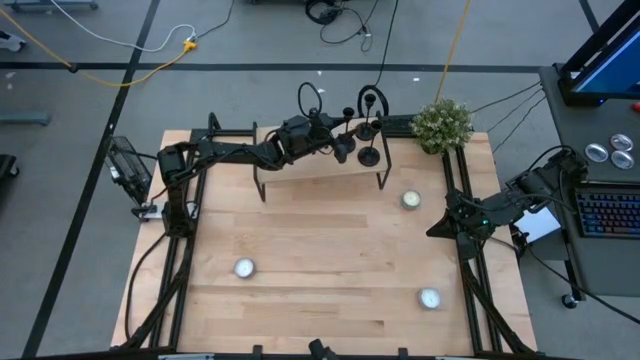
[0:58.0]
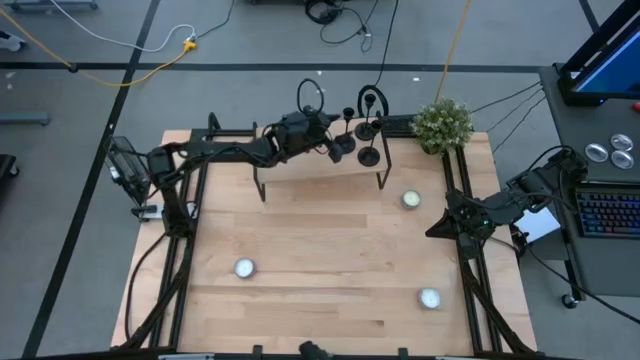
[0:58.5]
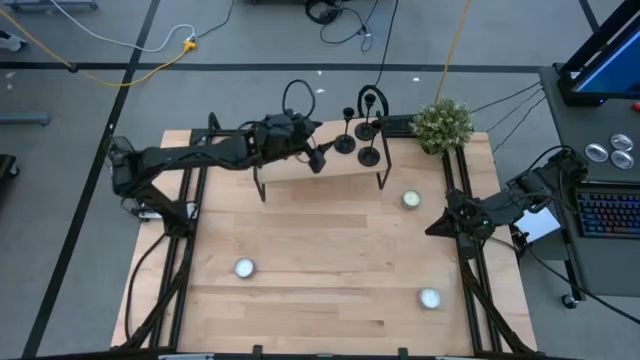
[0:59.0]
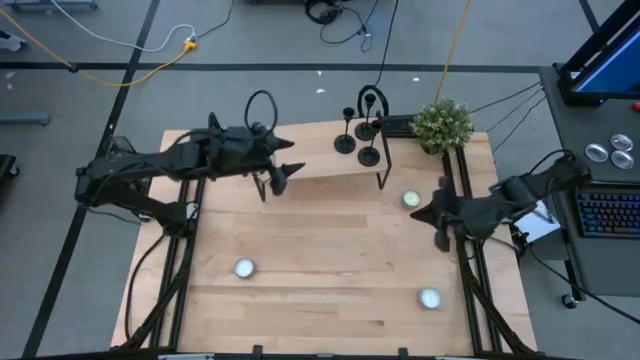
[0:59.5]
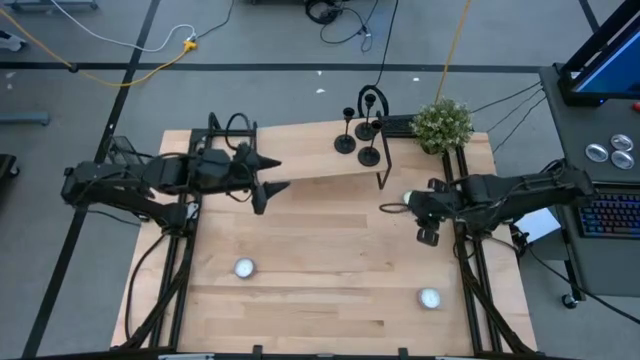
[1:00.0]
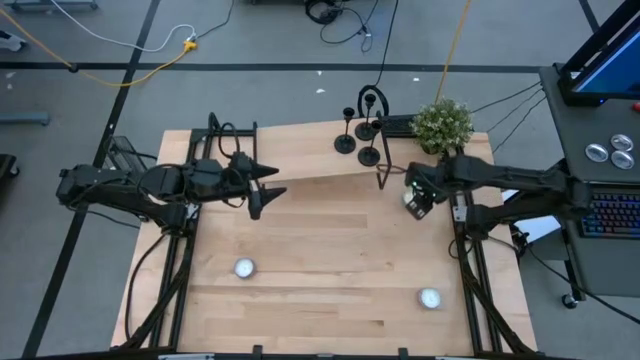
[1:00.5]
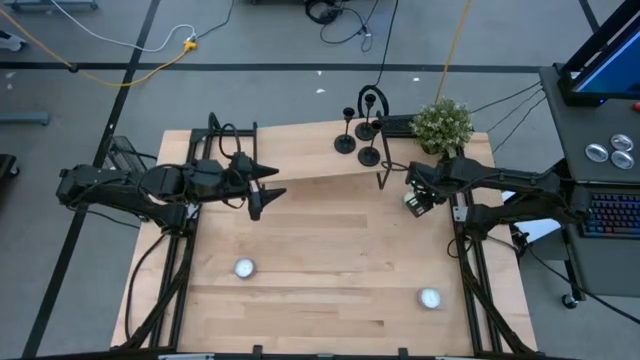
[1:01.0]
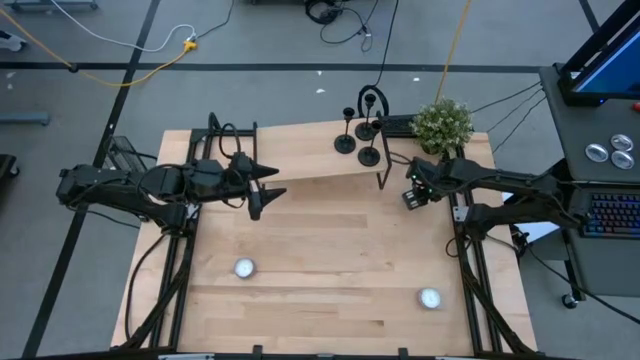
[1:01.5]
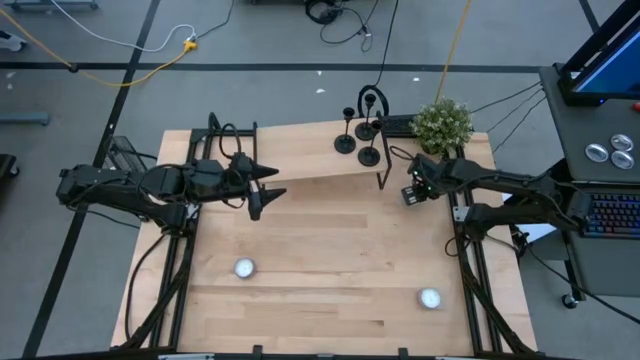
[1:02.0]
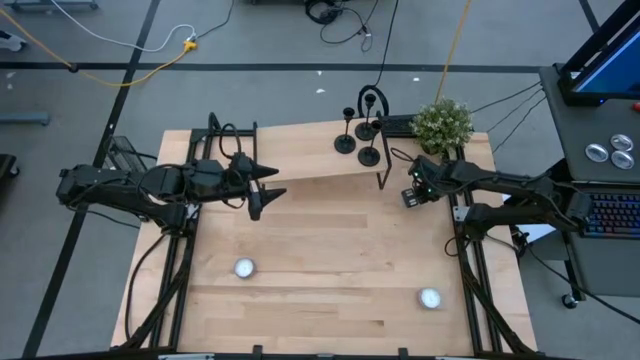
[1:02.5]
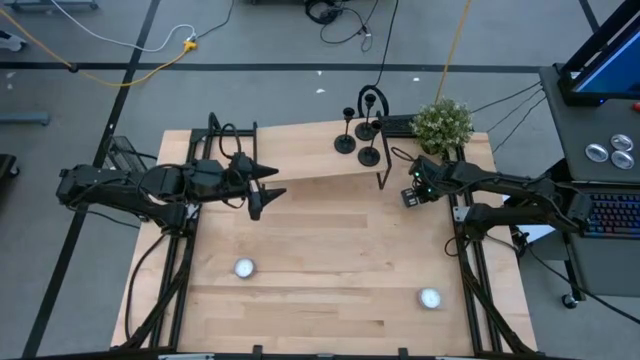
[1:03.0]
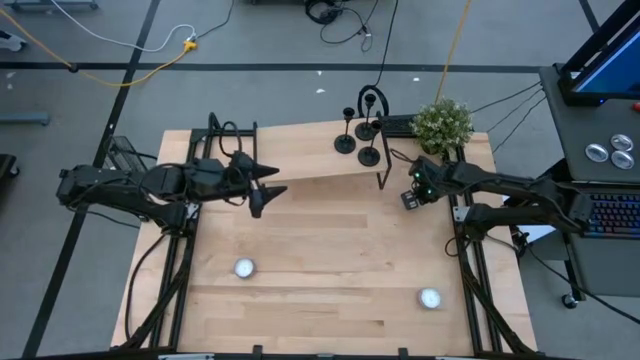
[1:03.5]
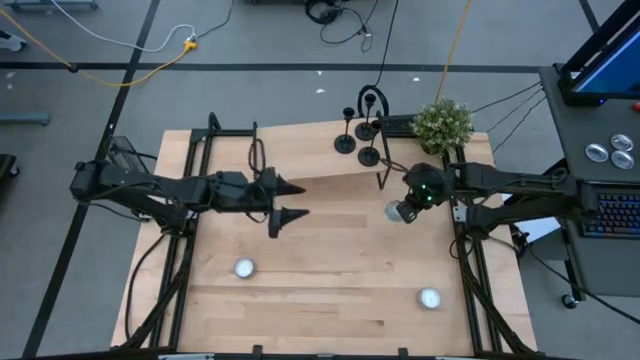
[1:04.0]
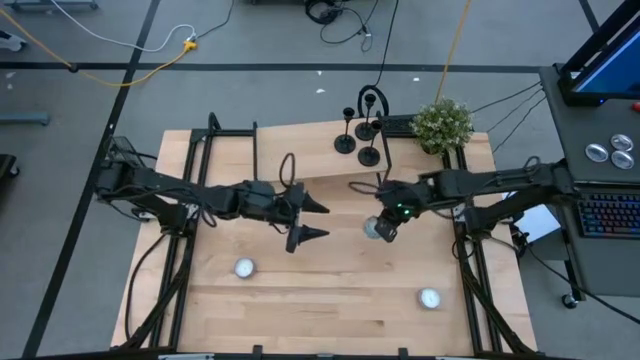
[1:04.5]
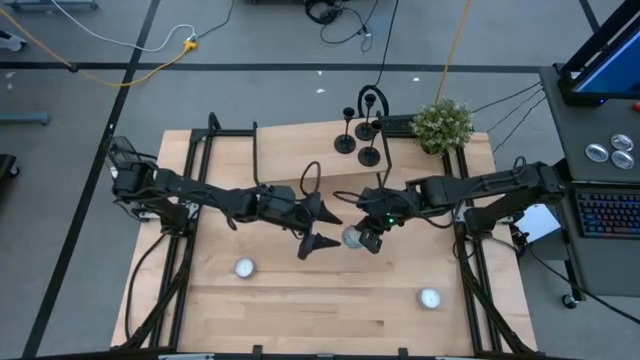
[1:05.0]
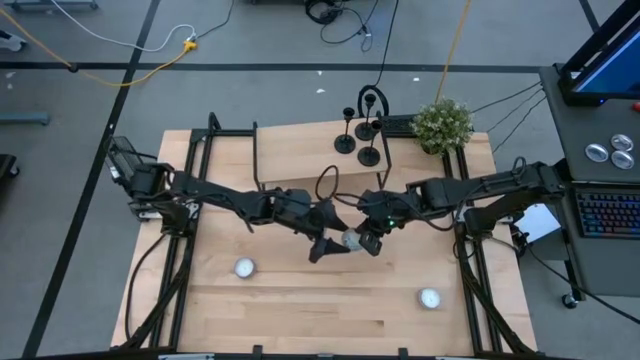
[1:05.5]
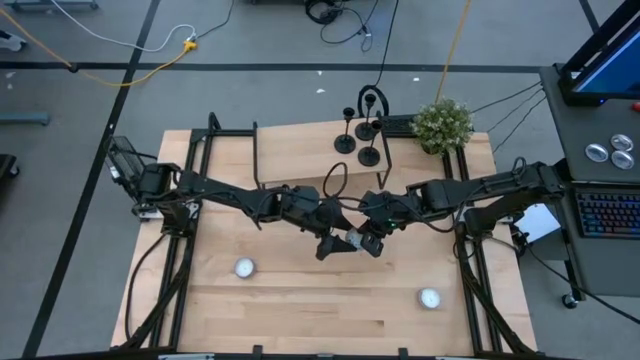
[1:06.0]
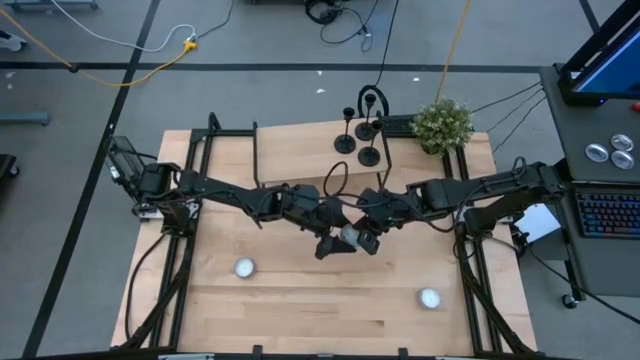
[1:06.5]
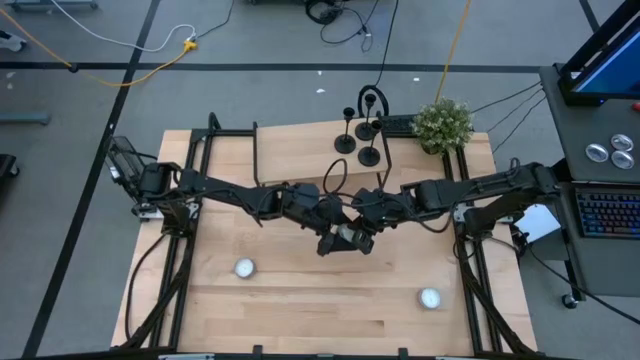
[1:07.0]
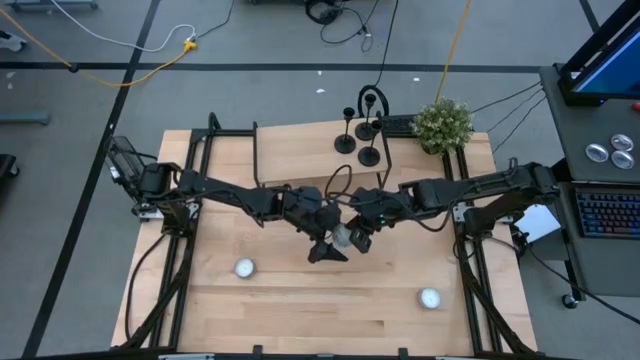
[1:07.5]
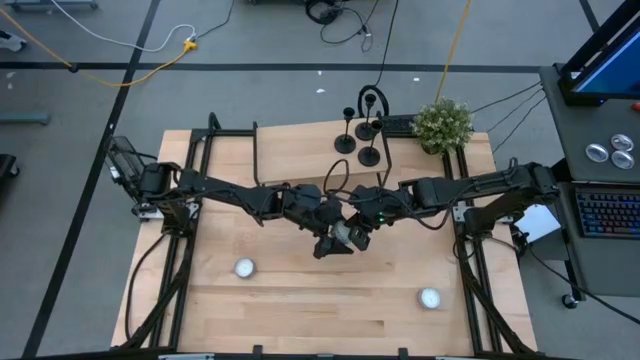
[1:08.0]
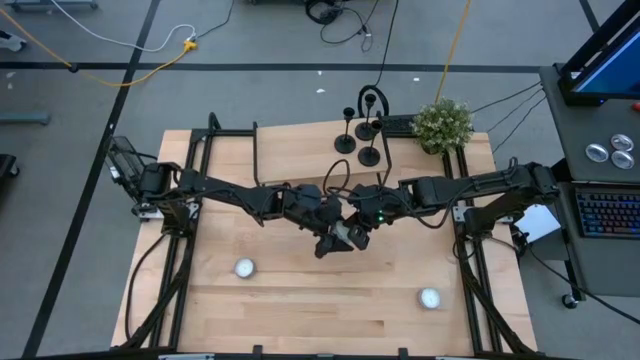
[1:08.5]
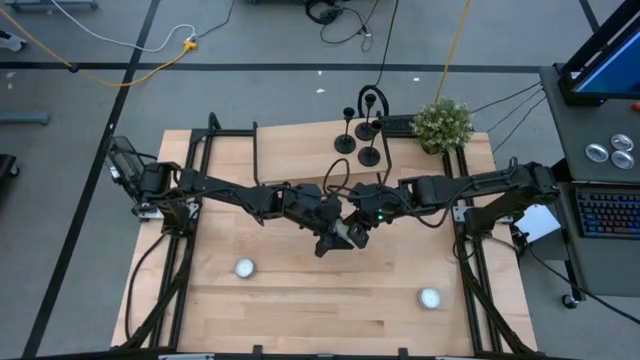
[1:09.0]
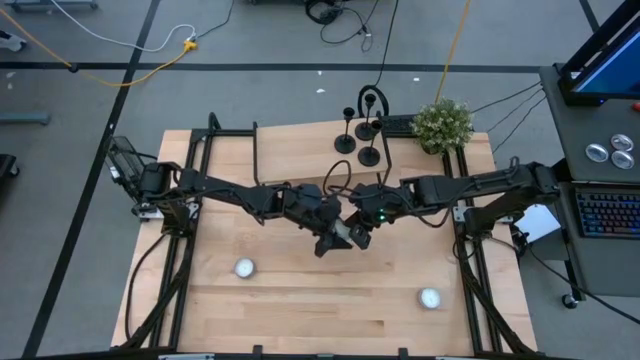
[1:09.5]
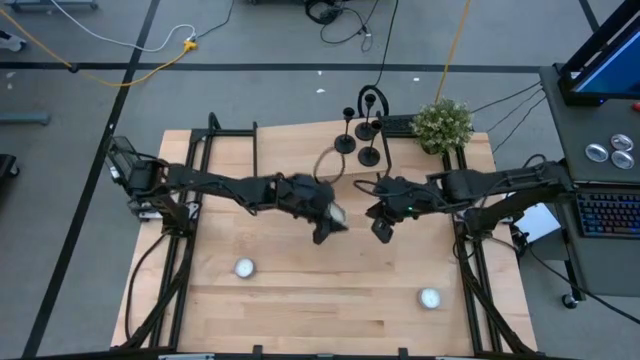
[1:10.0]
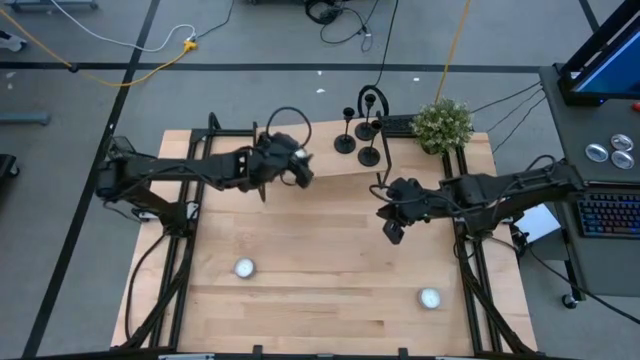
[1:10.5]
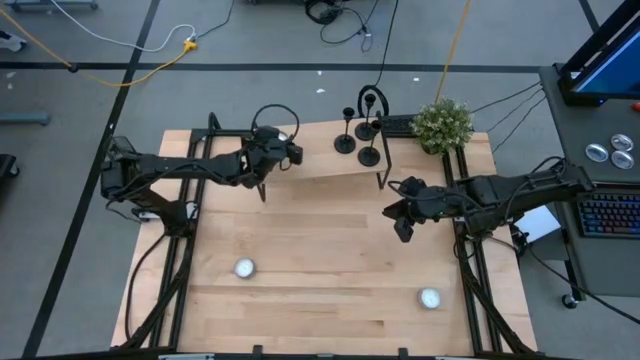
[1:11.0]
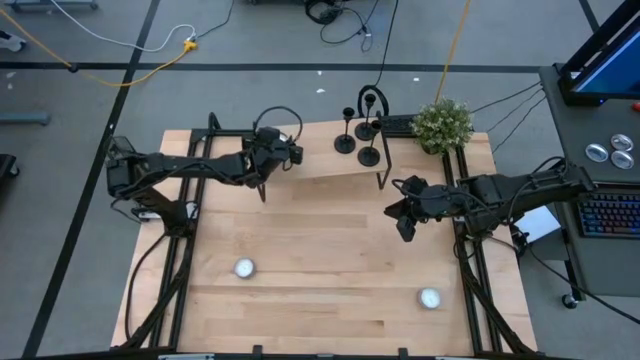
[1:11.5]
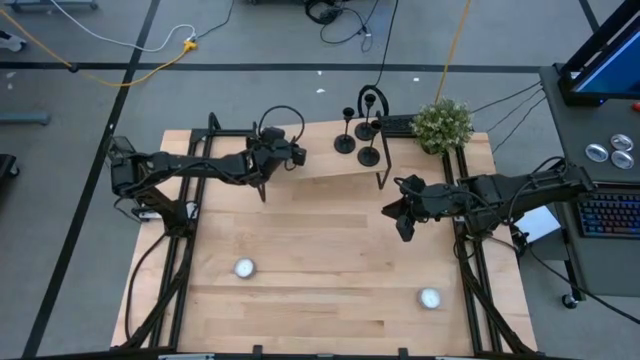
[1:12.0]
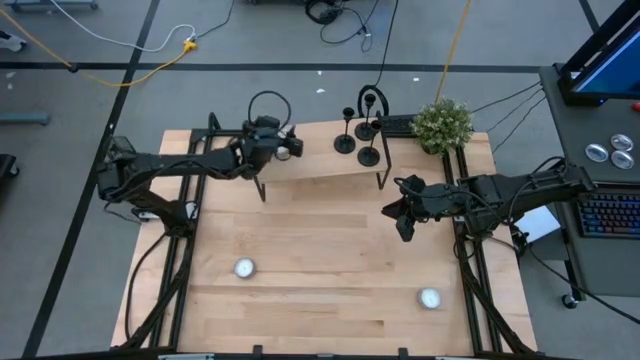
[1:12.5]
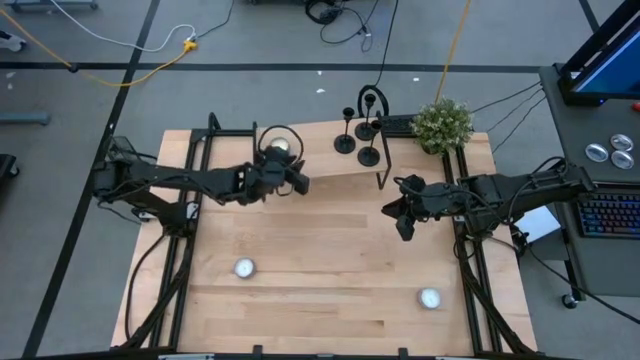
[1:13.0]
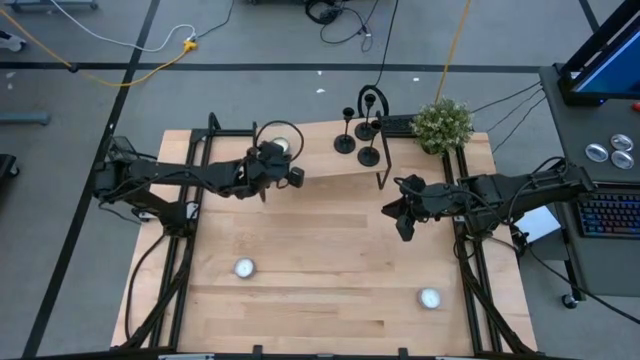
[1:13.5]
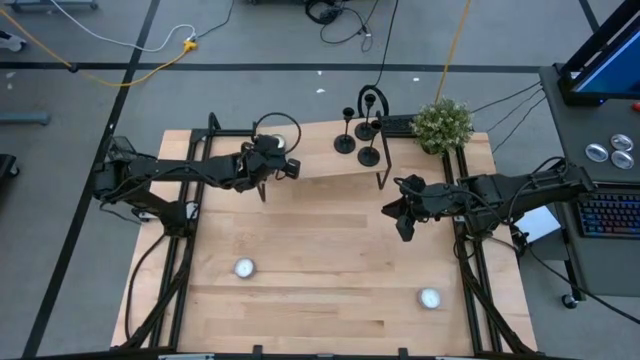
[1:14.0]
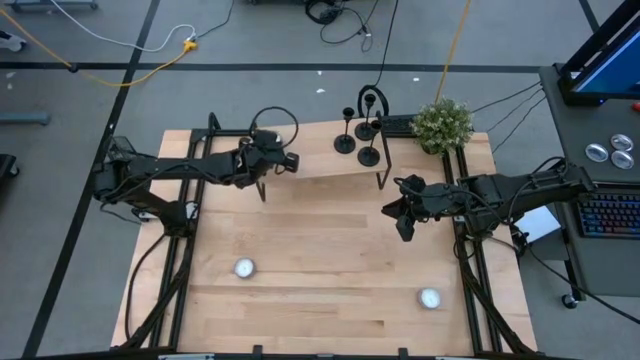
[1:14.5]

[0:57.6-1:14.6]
Task: Pick & Place candle stick holders
Put the blue patterned scented candle on the shelf

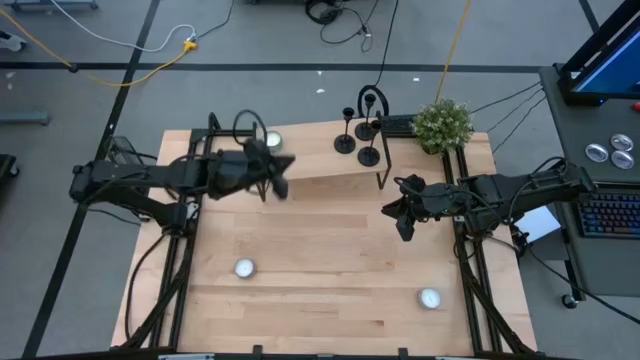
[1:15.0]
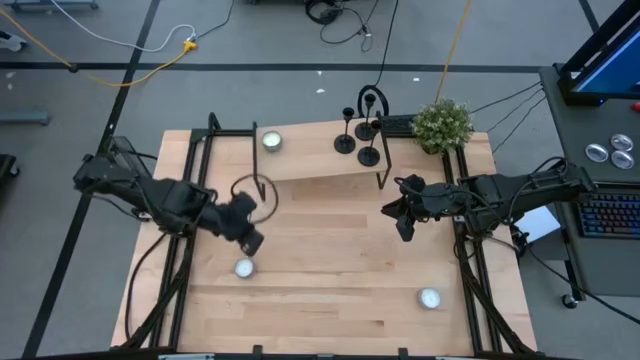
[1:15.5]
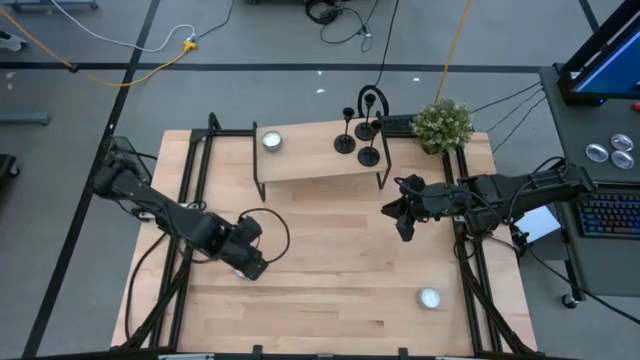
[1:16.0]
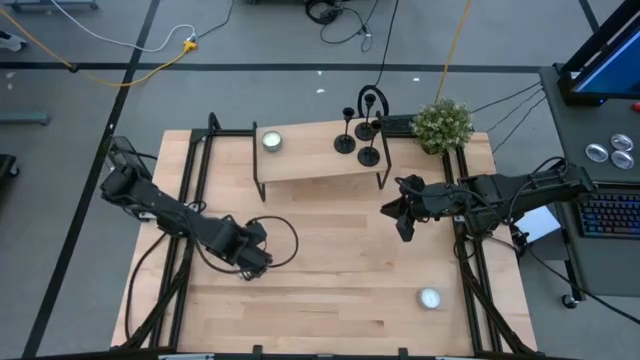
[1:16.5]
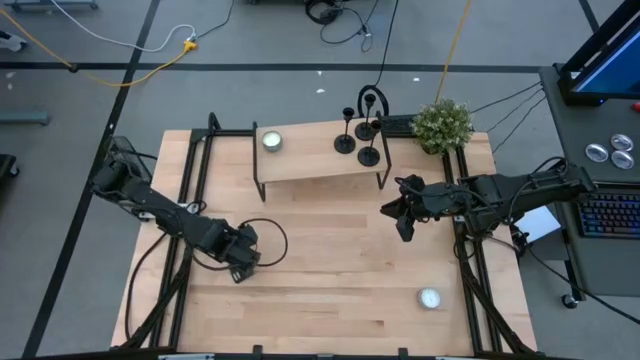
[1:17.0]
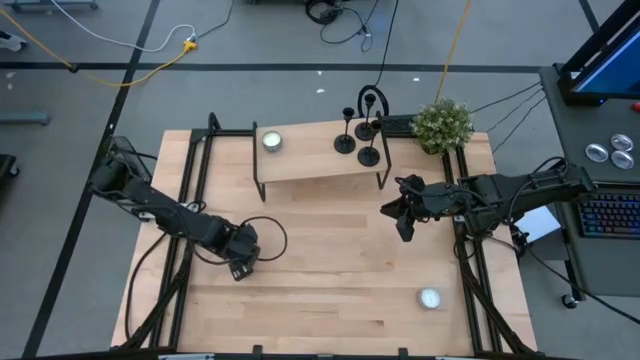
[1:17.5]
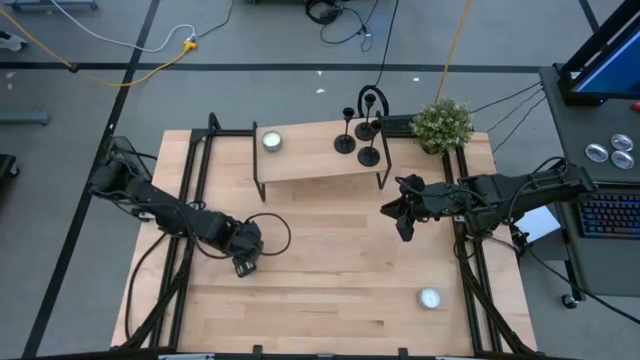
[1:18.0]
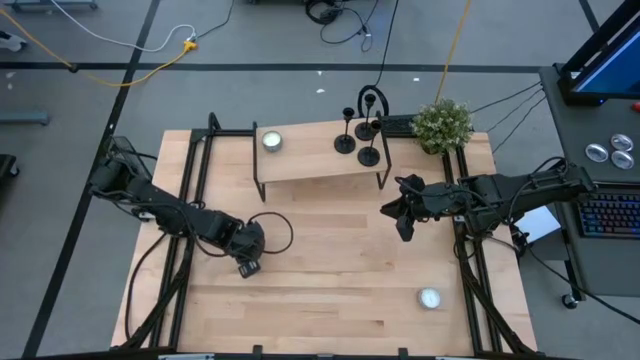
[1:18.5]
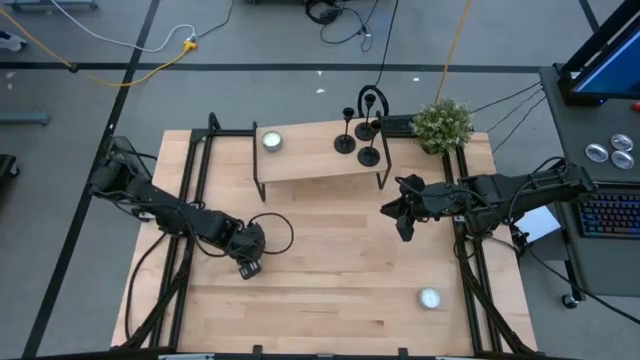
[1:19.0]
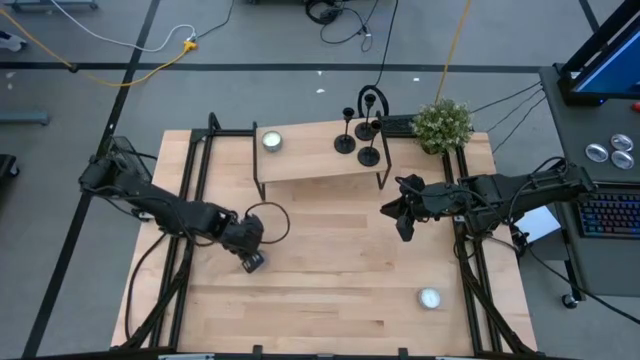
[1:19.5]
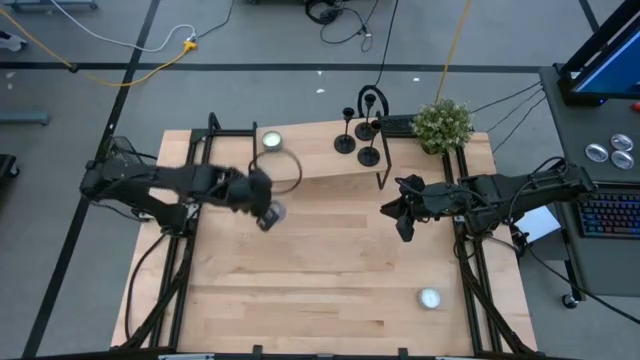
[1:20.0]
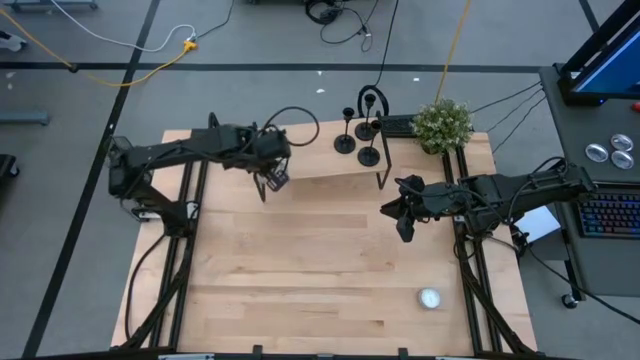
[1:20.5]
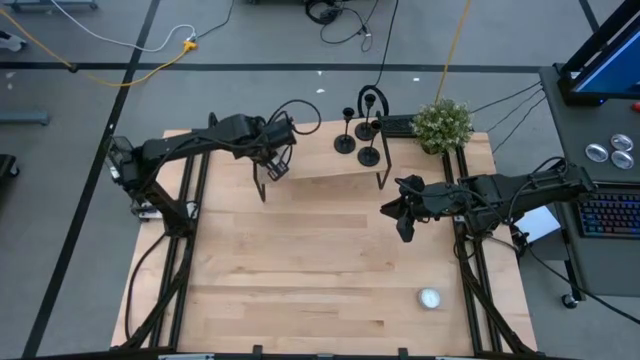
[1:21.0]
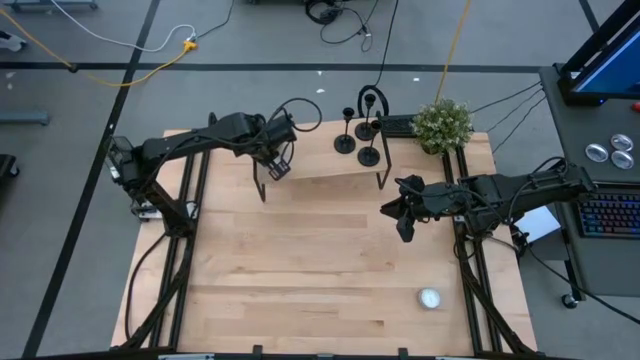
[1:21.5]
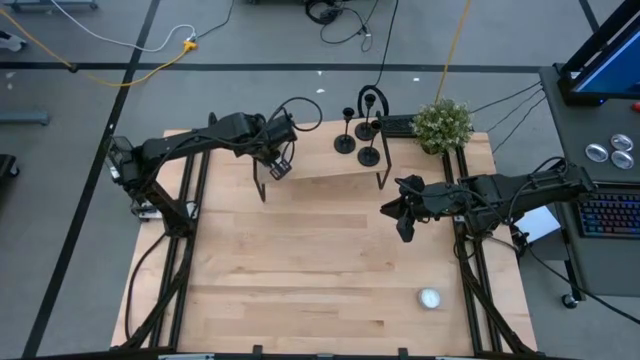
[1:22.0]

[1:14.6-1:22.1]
Put the purple patterned scented candle on the shelf aligned with the other blue patterned scented candle
